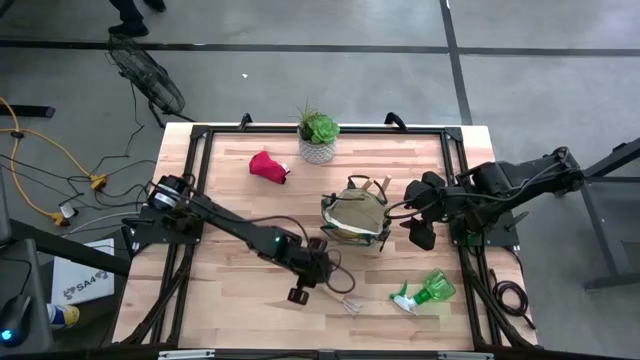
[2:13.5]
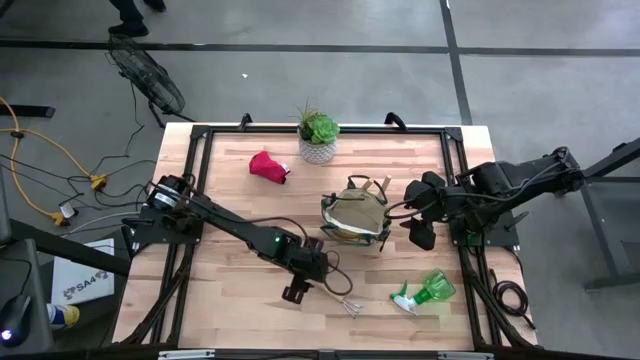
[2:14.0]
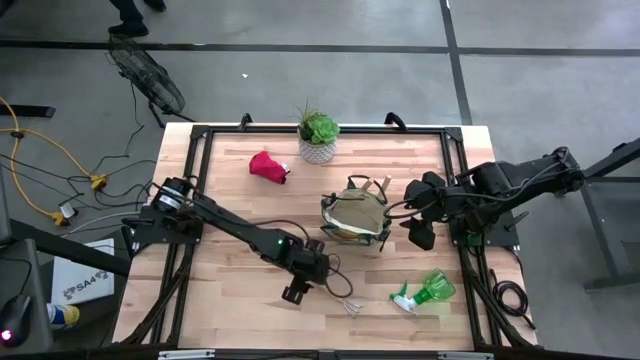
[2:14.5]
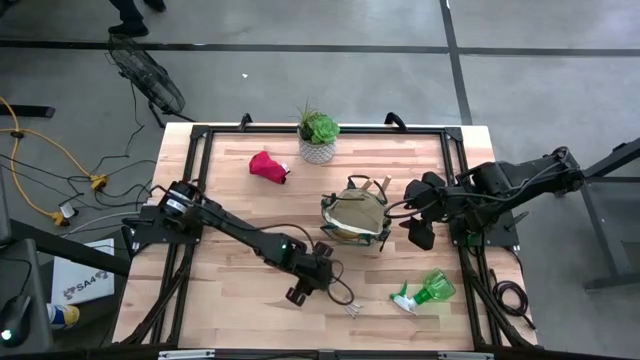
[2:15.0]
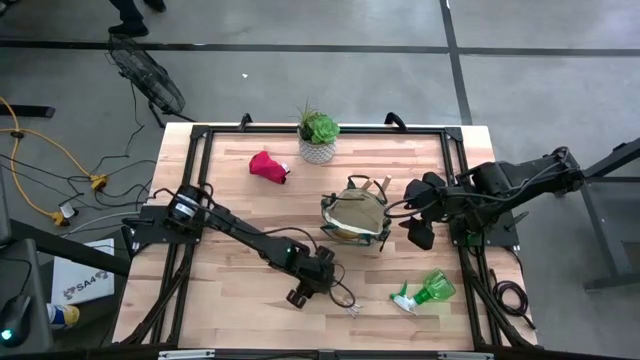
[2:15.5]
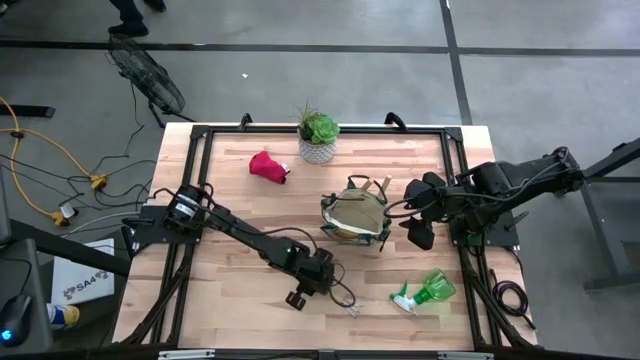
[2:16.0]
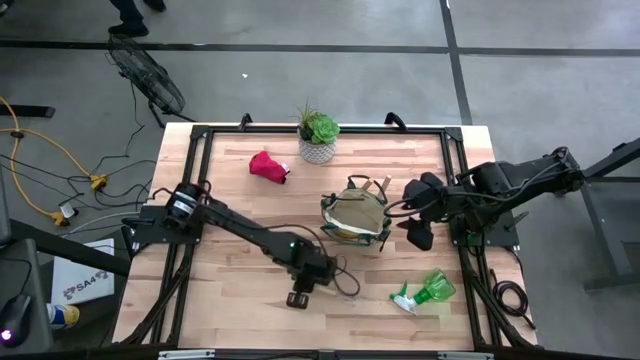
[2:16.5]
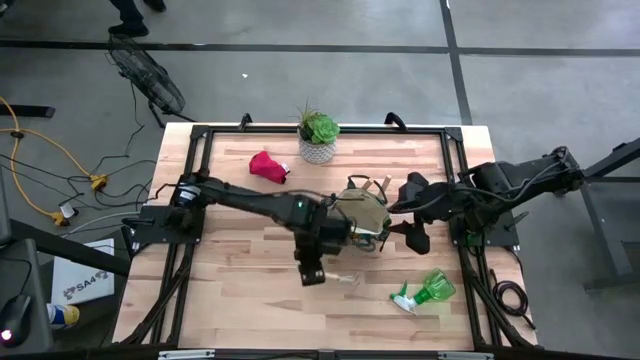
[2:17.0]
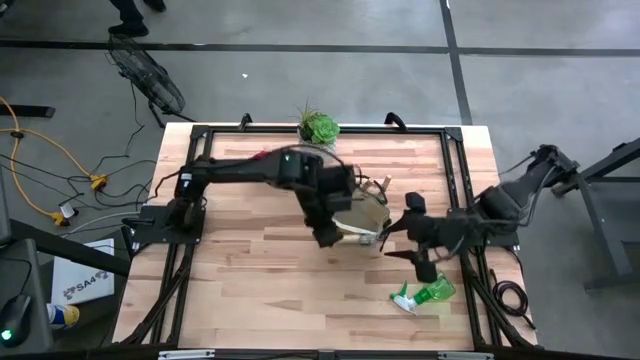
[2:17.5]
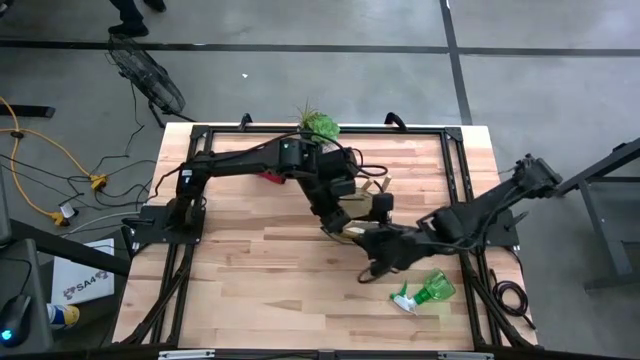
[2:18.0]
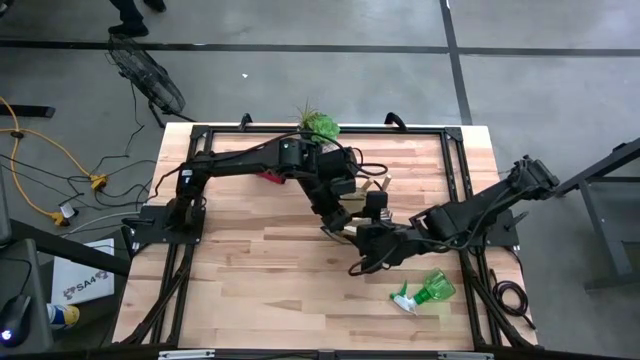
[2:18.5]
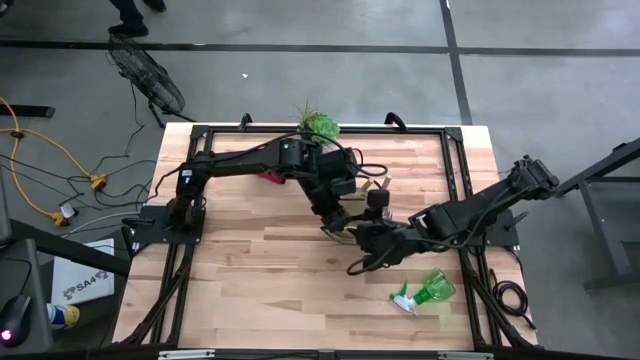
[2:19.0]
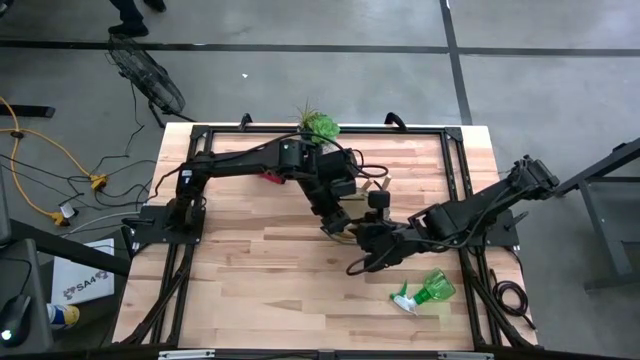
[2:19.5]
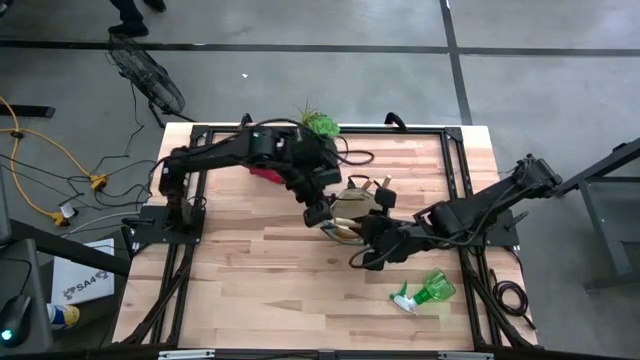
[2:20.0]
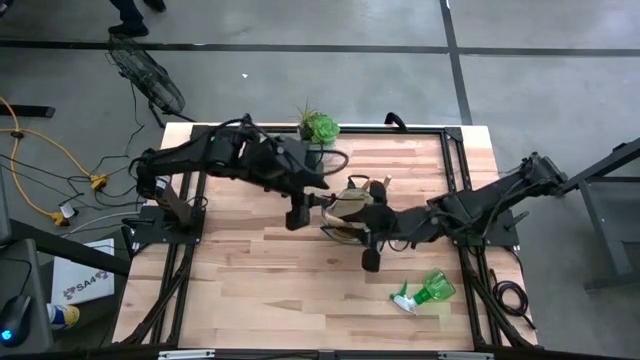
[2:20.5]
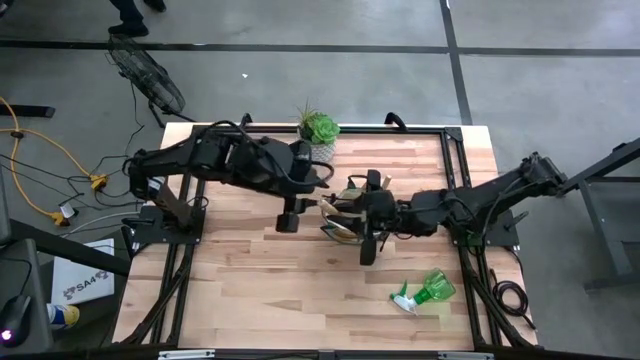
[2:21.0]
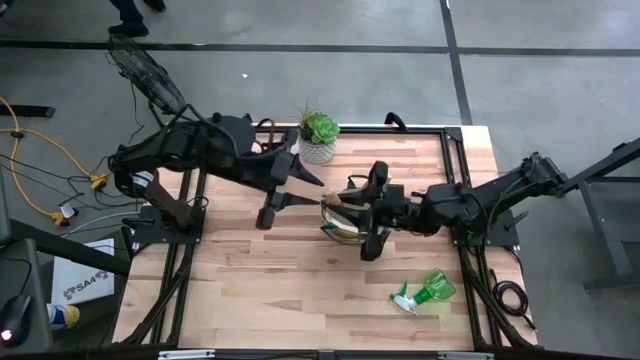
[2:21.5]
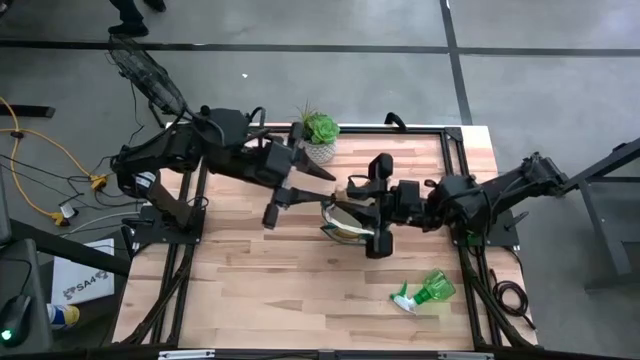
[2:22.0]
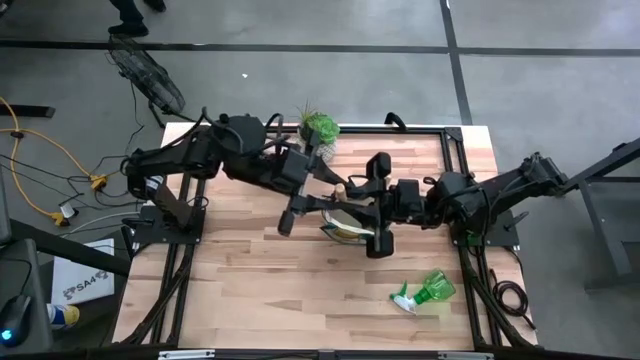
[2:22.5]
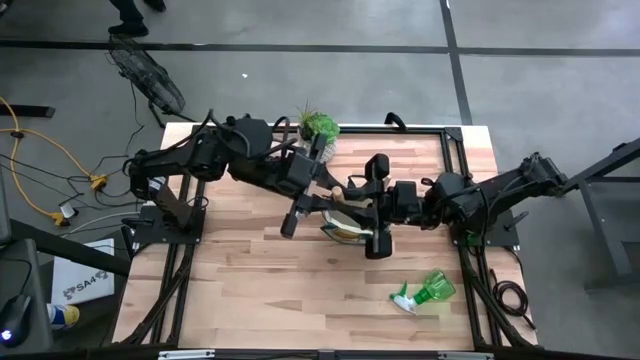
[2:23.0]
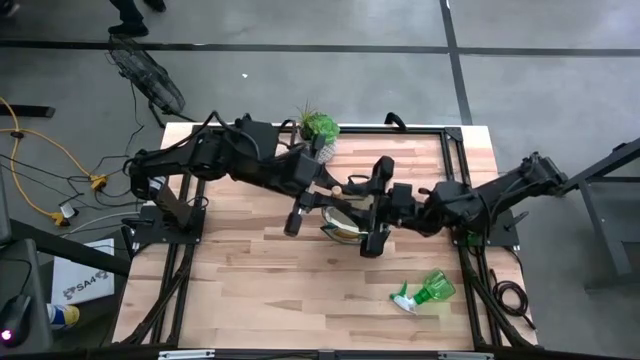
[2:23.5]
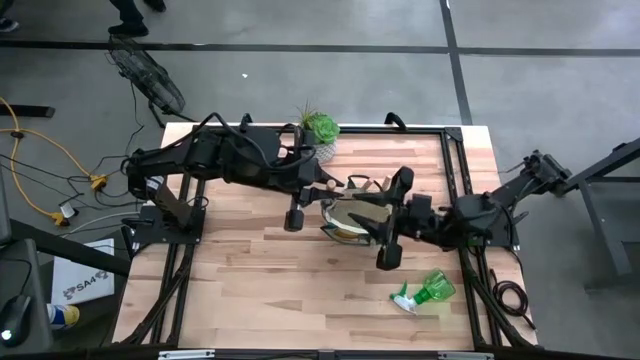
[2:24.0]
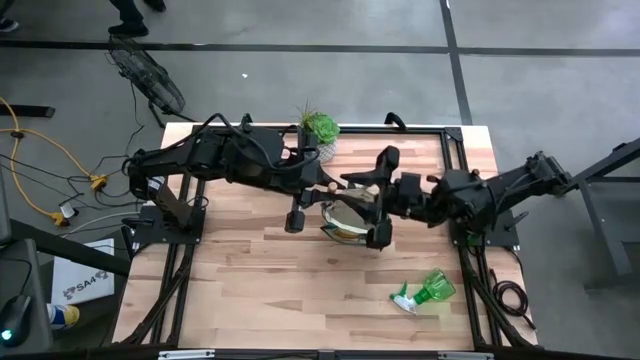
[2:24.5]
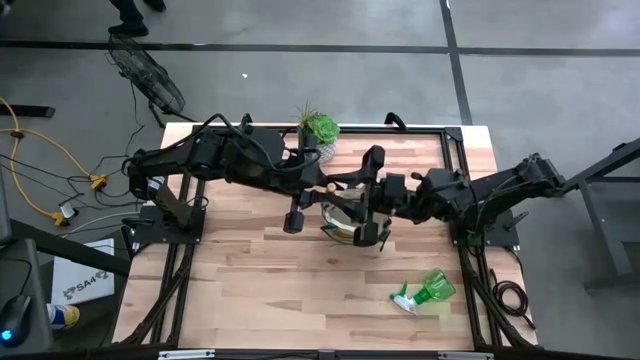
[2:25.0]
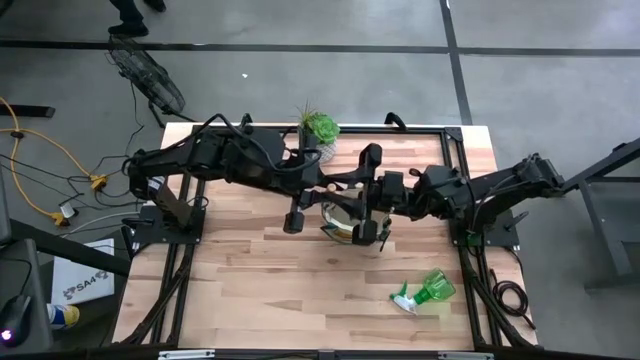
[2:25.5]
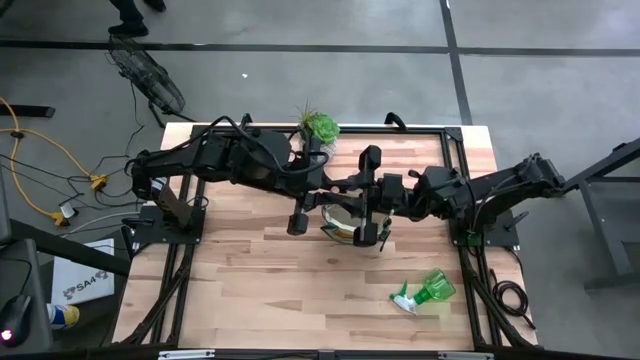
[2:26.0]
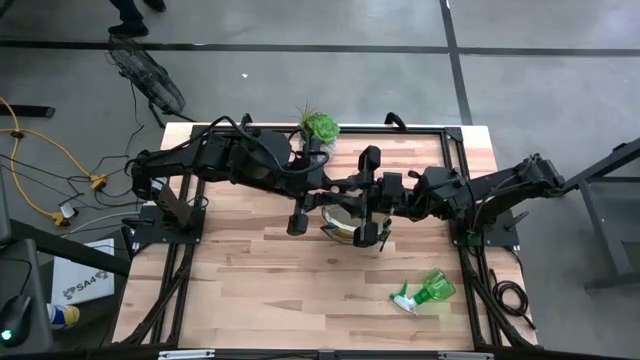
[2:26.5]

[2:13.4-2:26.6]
Task: Pick & Place Garden tools in Gardening bag
Put the brown hand rake into the gardening bag

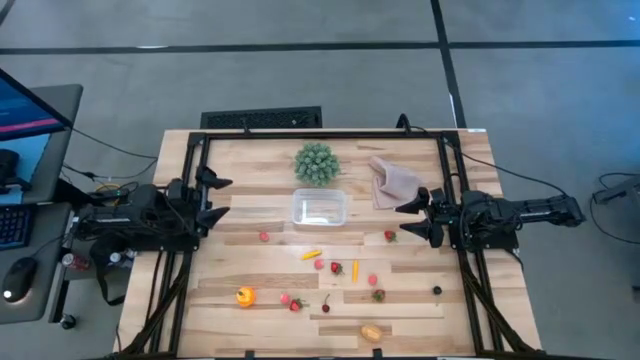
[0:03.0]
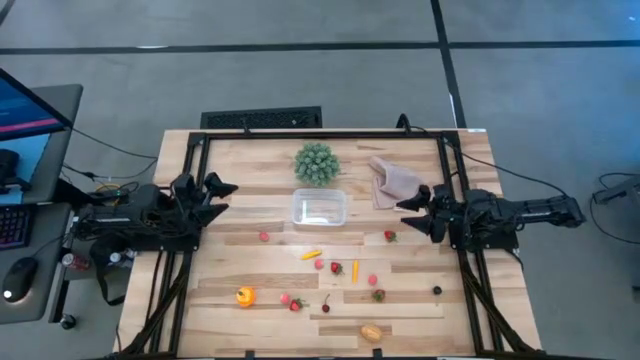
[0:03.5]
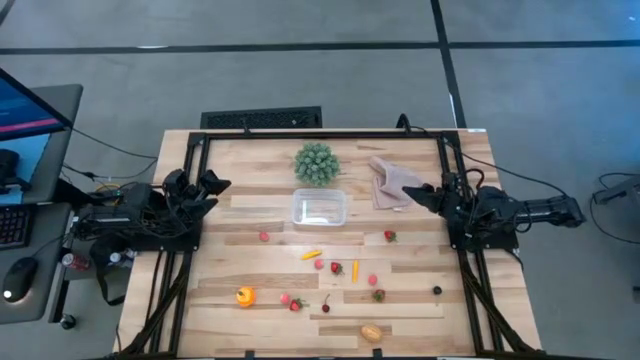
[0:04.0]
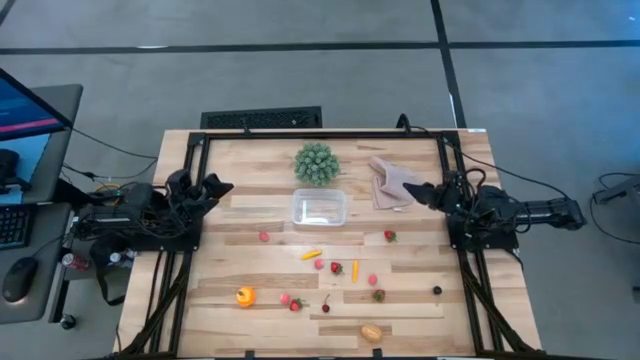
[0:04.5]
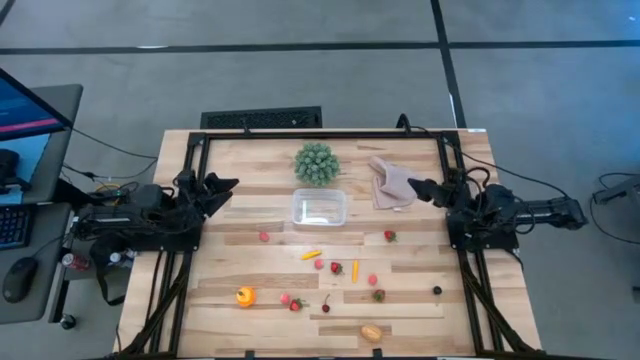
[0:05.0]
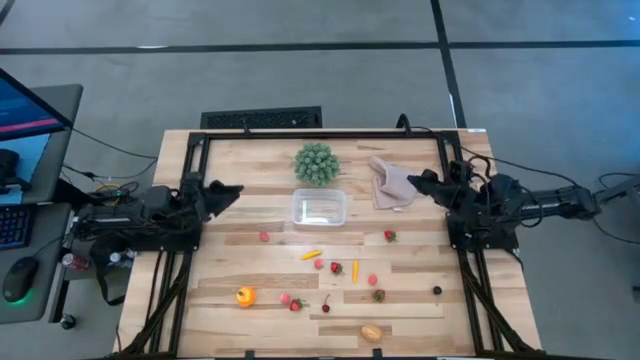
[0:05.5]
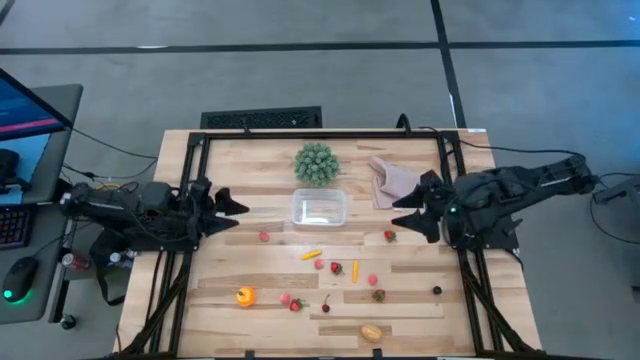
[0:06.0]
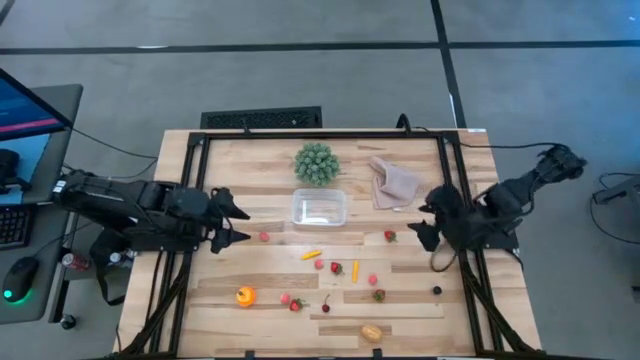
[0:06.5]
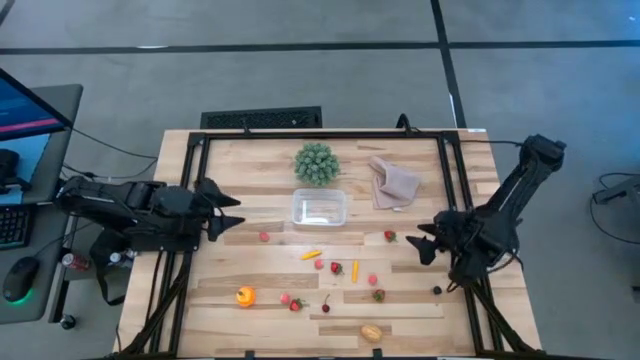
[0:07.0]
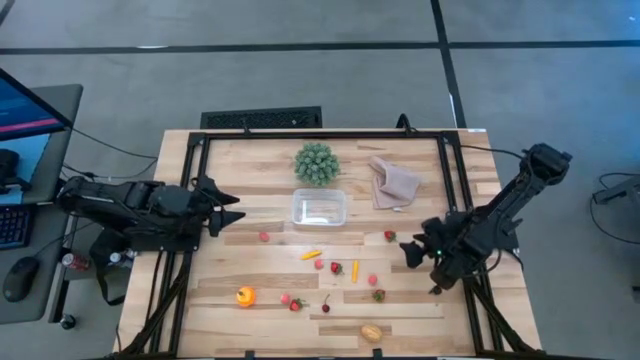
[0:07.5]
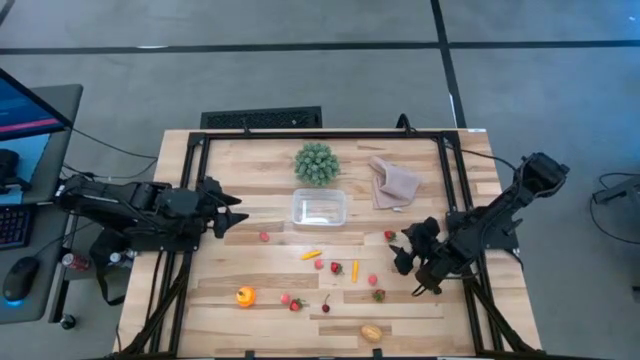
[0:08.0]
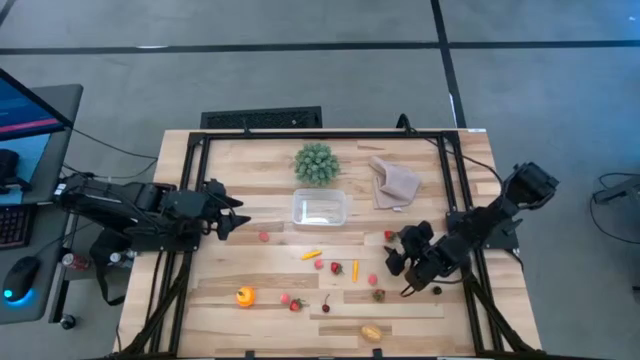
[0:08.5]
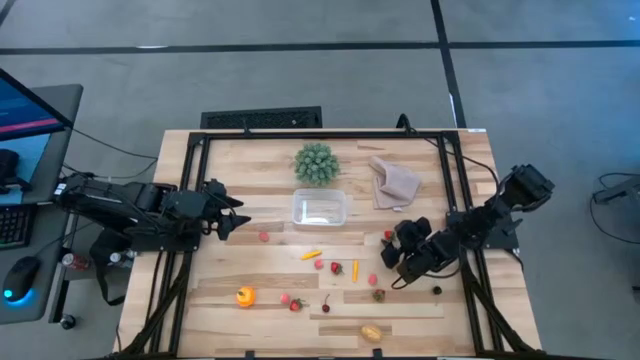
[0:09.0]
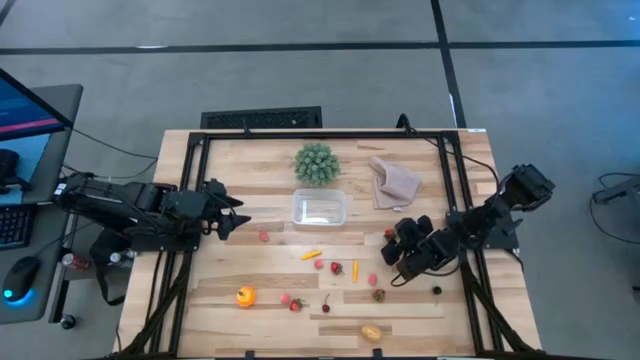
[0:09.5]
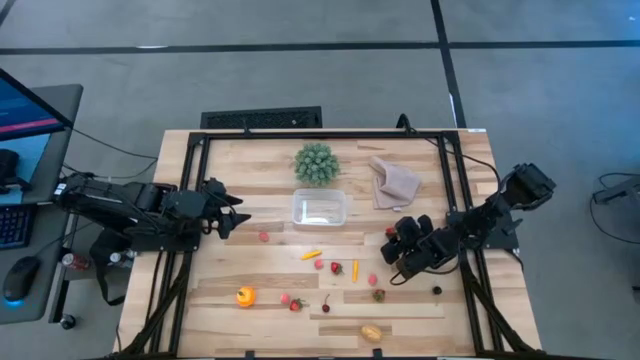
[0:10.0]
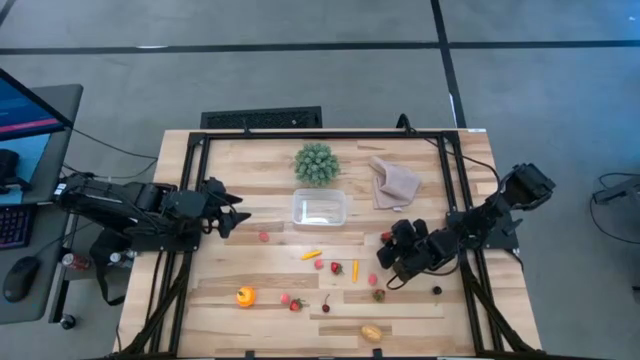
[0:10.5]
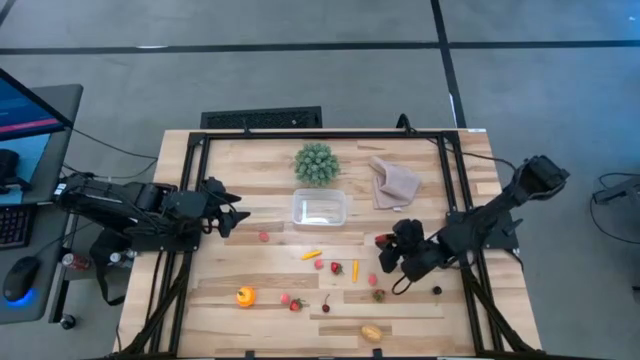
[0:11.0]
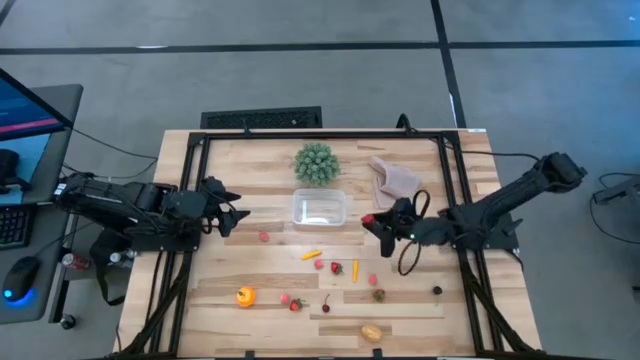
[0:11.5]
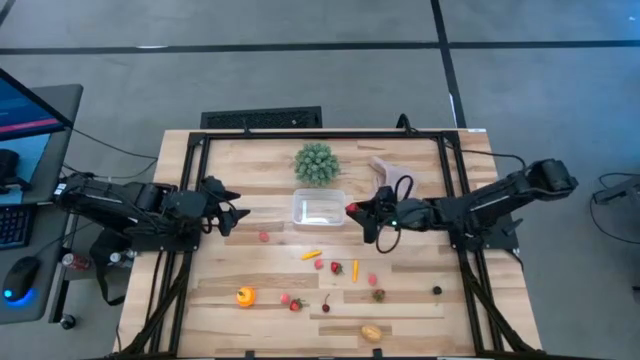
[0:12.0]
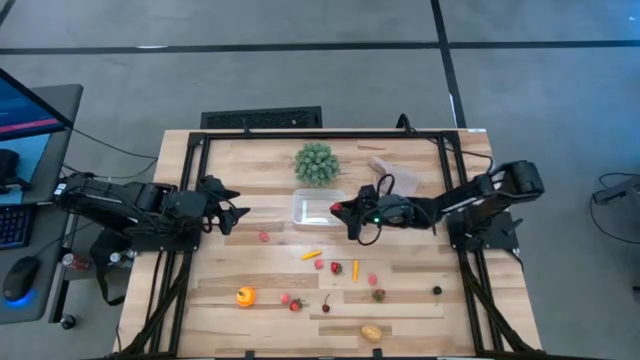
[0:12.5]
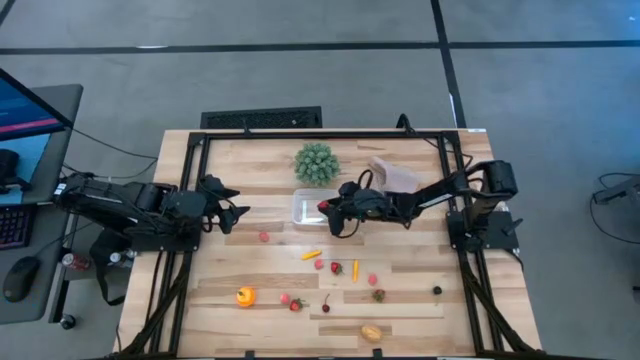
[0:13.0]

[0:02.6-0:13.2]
Task: Pick and placing Produce into tupperware
Put the red strawberry into the transparent container
